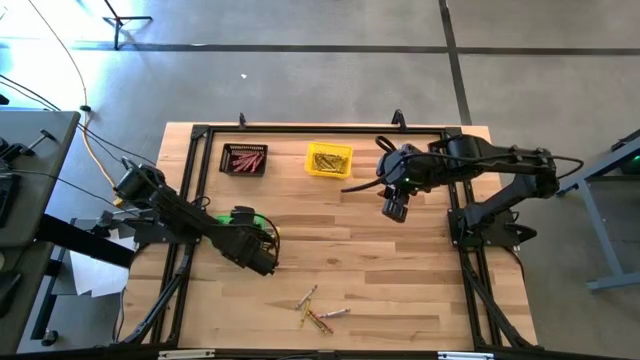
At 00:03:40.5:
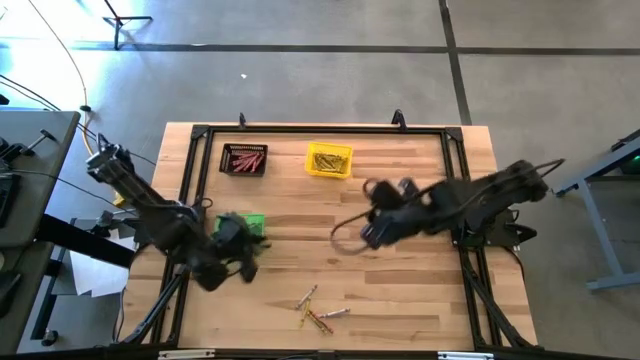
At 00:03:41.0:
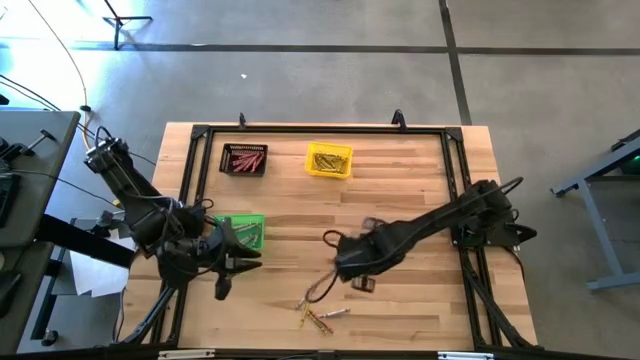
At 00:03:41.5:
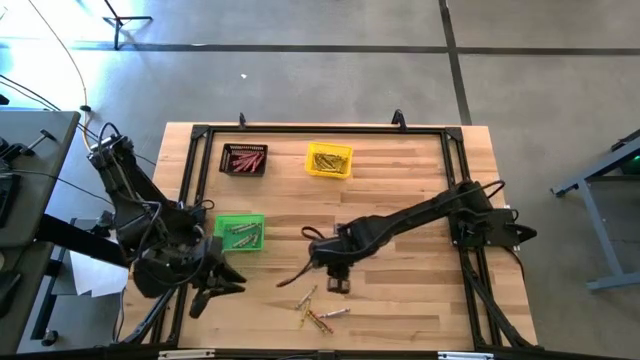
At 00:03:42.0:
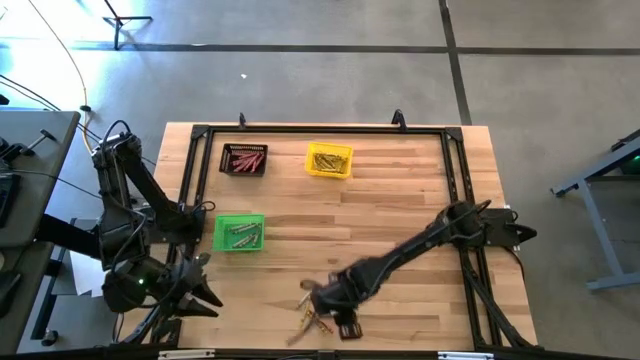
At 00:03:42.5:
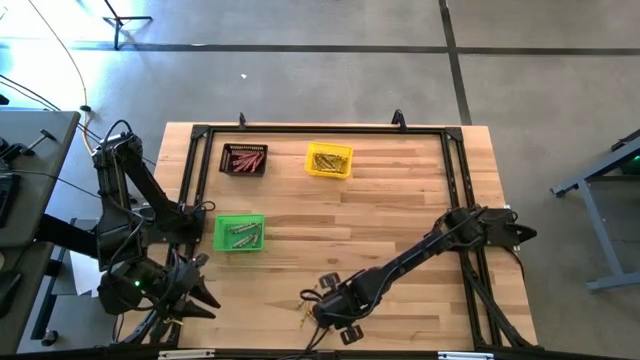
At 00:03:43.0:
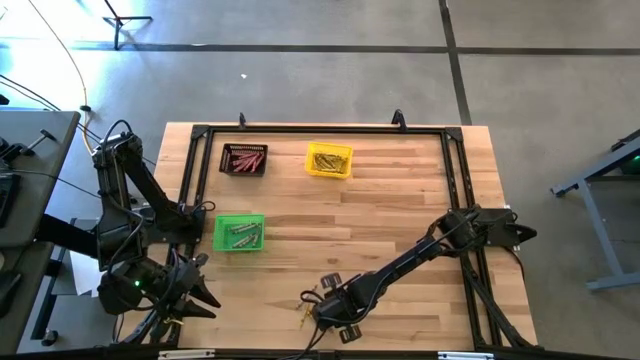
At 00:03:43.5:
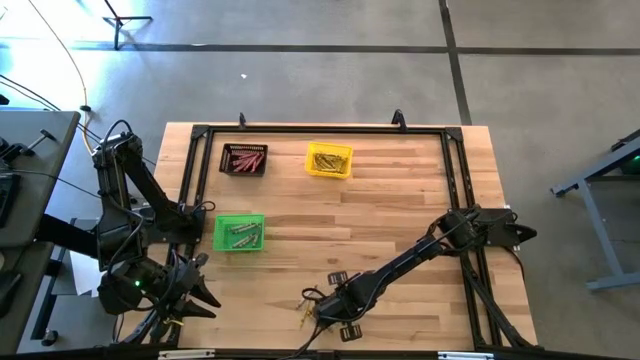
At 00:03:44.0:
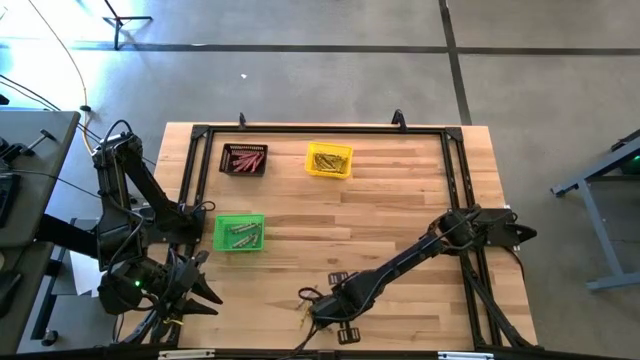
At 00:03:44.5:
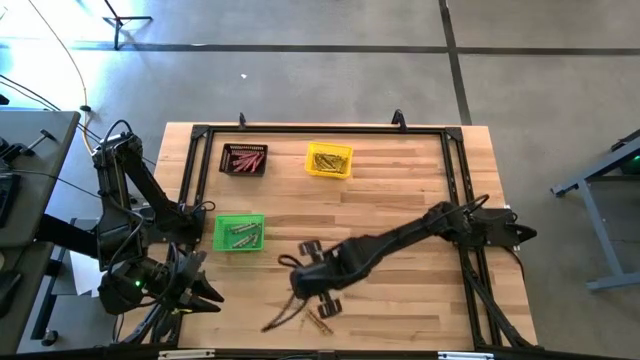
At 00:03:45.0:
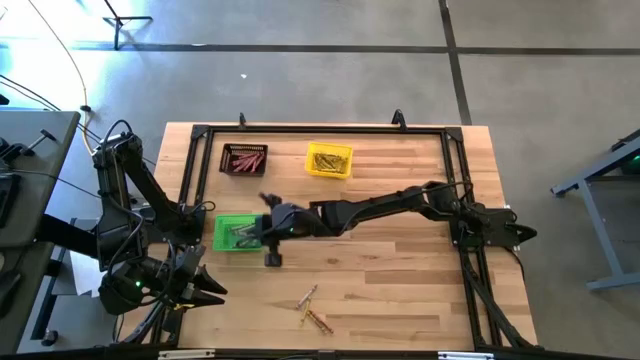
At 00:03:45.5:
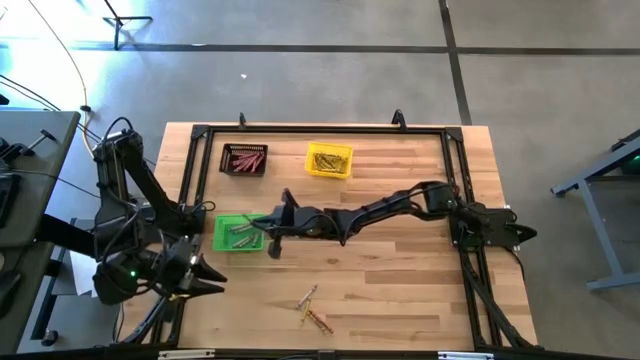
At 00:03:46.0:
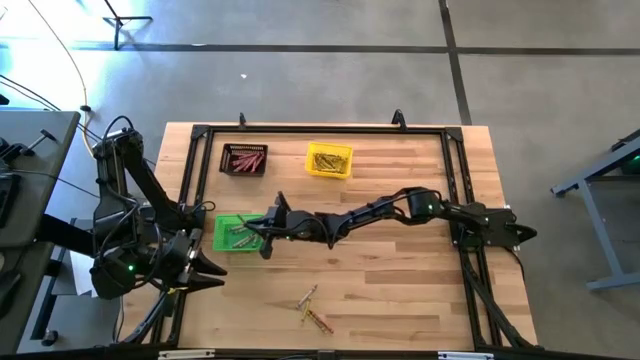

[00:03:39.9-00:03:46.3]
Task: Sort crayons
Put the blue crayon into the green bin

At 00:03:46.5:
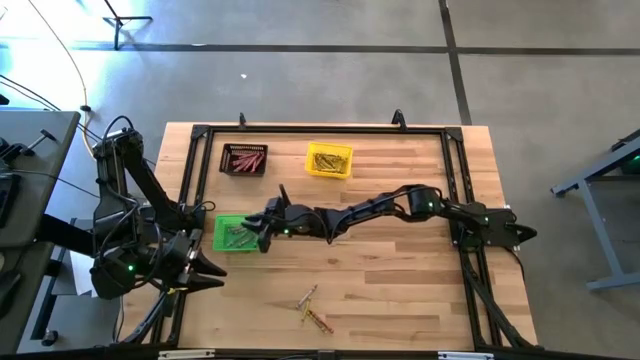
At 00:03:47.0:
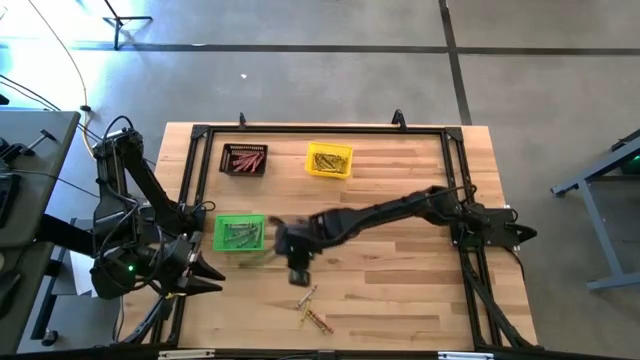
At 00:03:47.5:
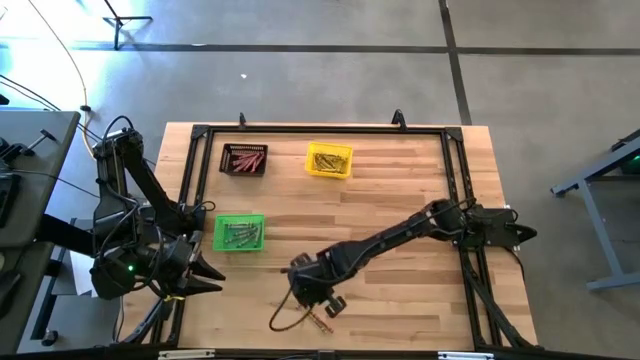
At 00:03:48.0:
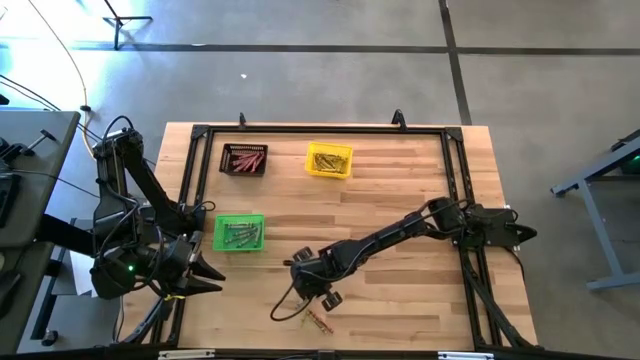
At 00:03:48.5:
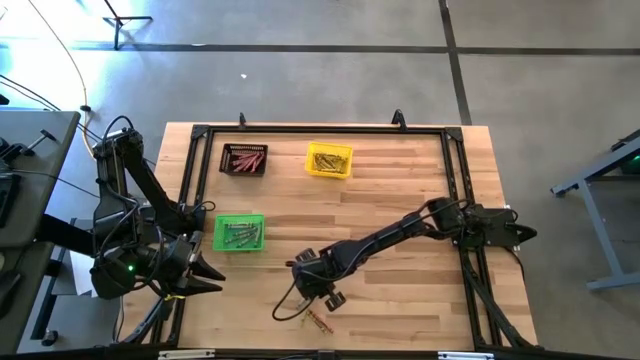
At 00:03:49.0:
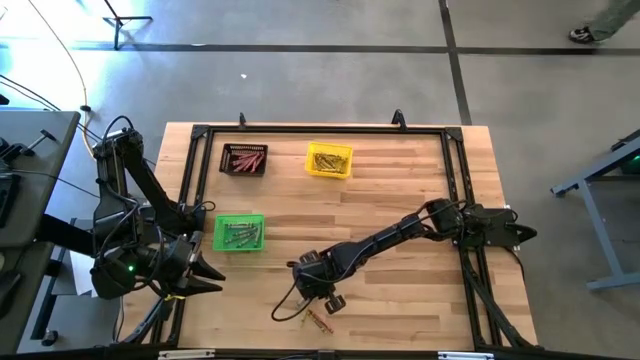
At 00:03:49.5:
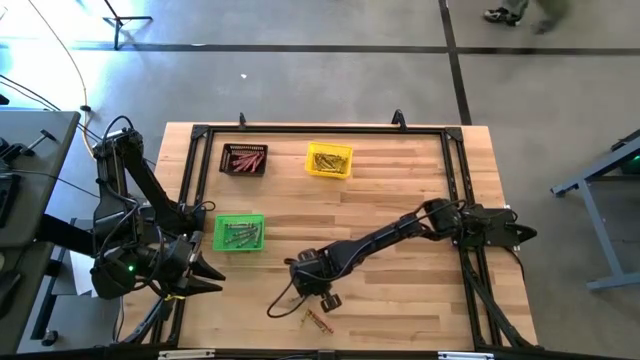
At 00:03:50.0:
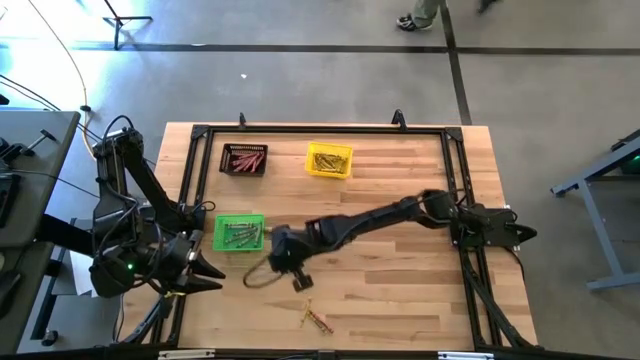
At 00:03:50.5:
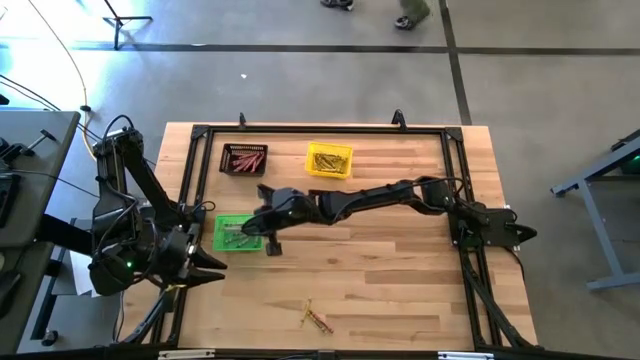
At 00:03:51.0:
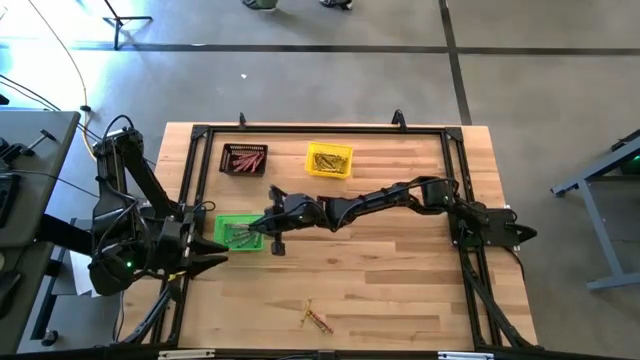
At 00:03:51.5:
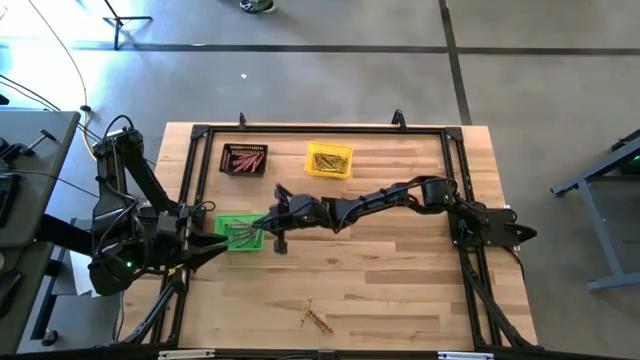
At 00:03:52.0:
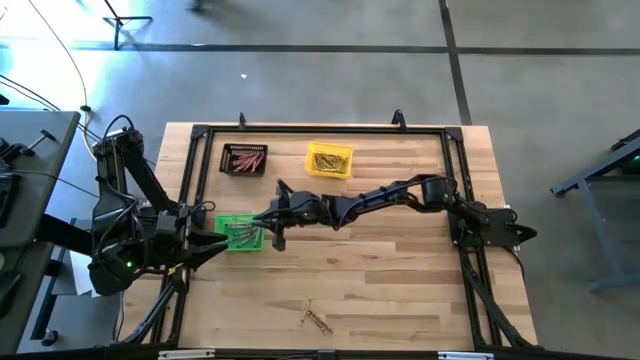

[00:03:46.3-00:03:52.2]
Put the blue crayon into the green bin

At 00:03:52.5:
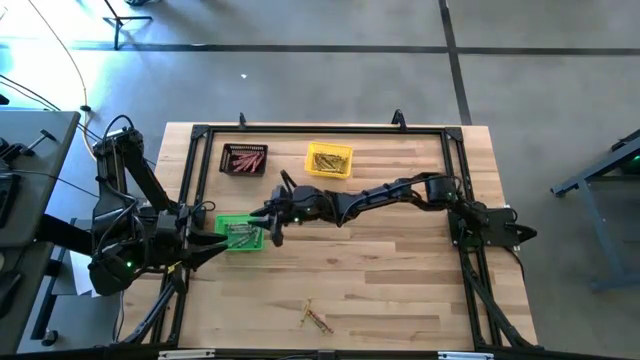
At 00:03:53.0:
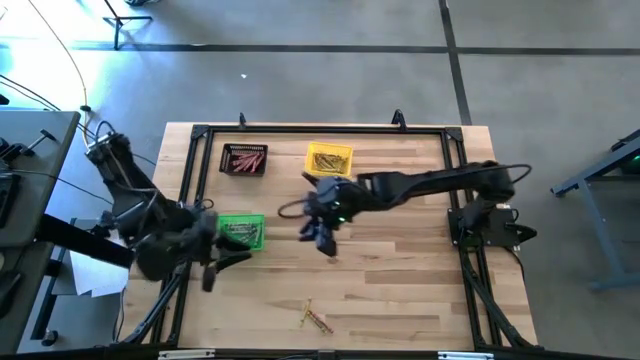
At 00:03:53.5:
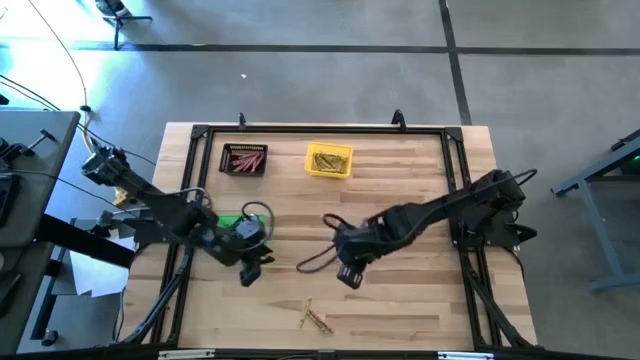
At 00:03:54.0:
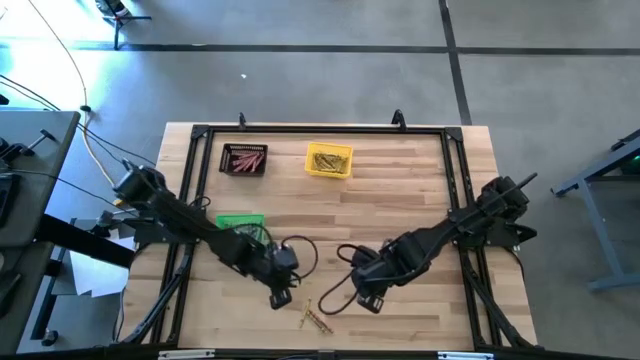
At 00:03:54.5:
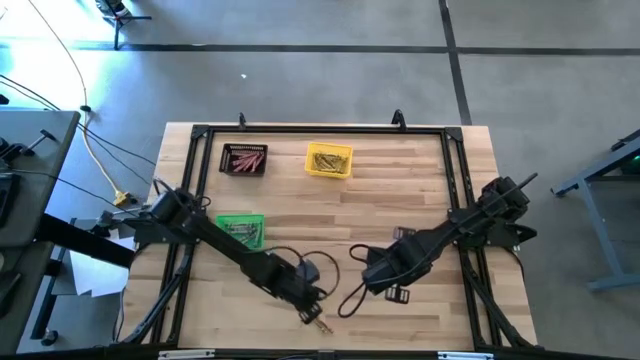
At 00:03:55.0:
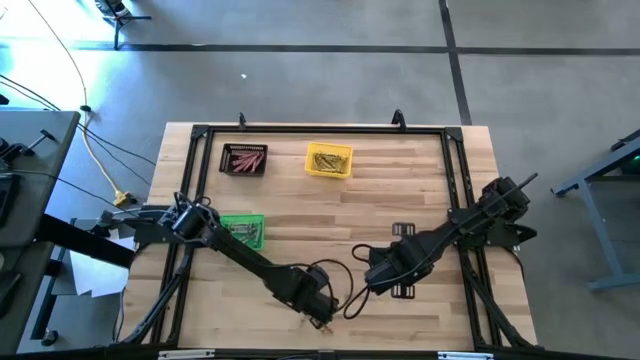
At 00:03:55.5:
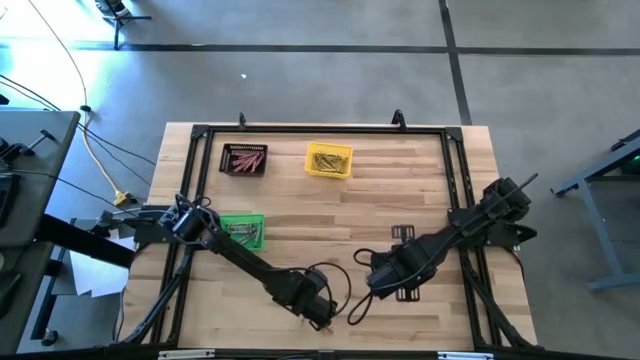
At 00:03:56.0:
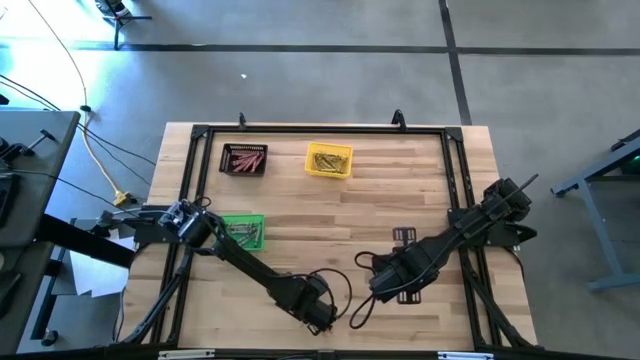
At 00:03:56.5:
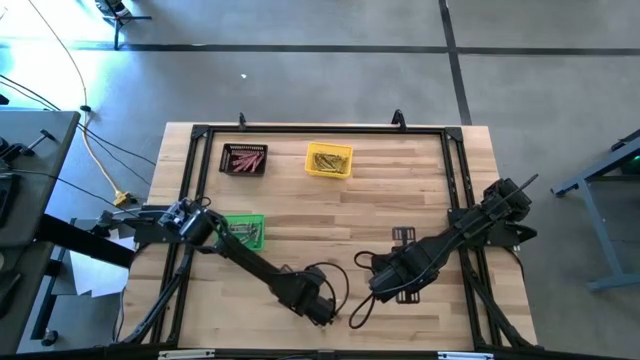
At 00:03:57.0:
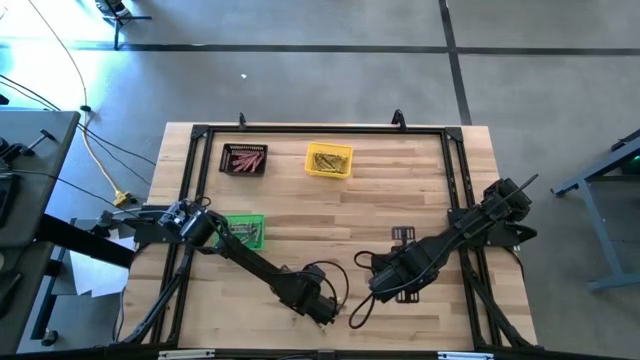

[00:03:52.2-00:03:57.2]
Put the yellow crayon into the yellow bin

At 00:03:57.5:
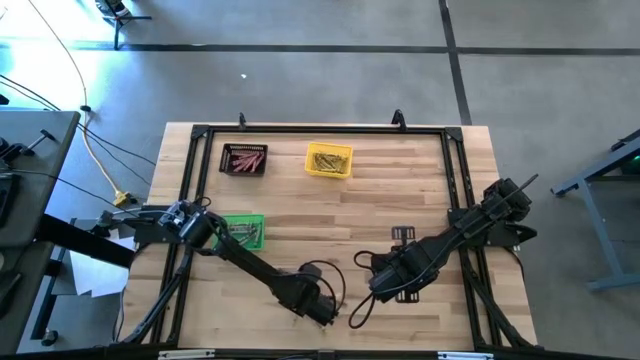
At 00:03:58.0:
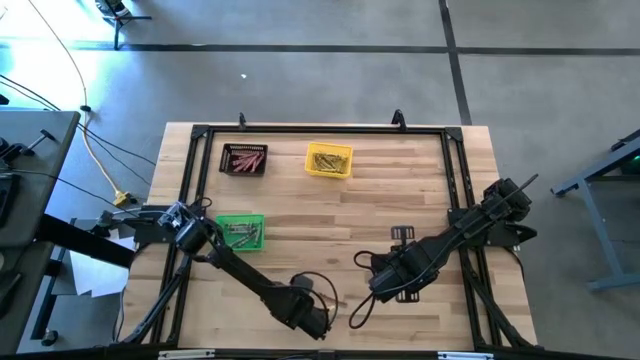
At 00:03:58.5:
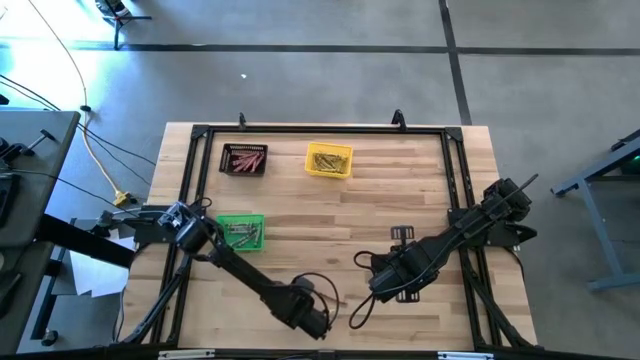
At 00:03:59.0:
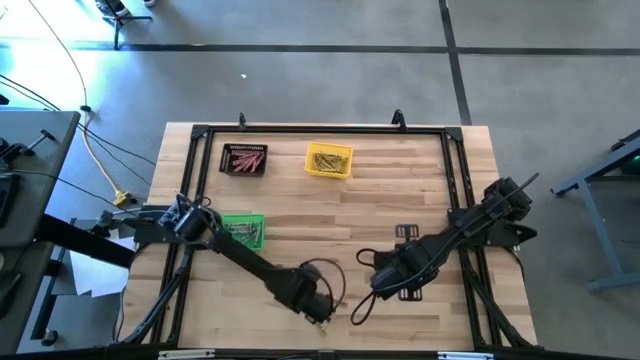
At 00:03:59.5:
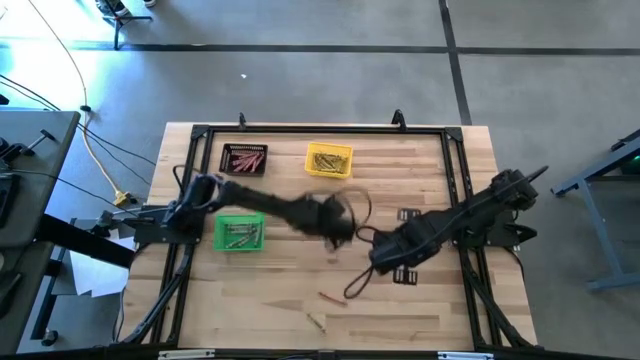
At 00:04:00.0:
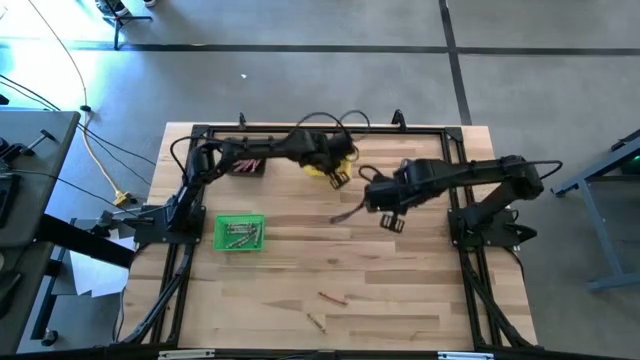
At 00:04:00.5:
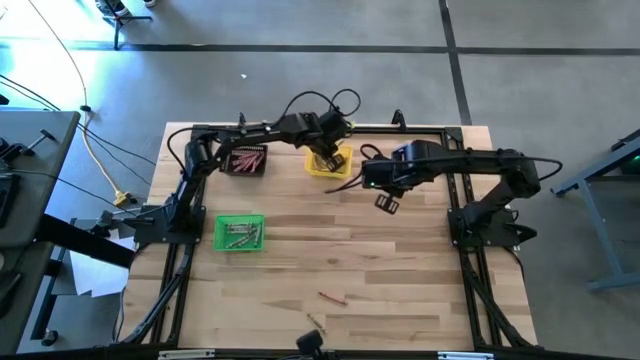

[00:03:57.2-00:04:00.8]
Put the yellow crayon into the yellow bin
